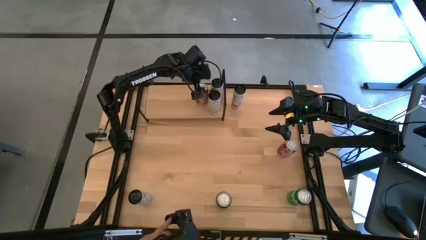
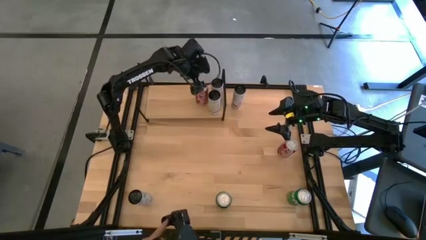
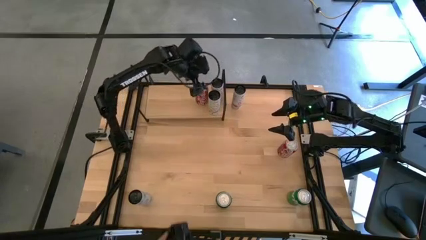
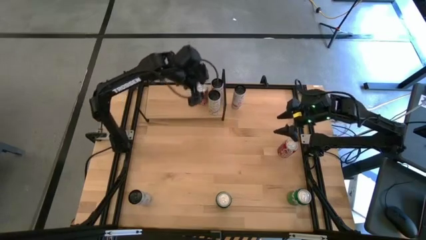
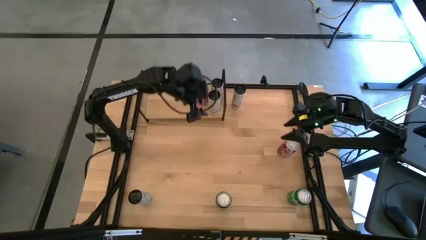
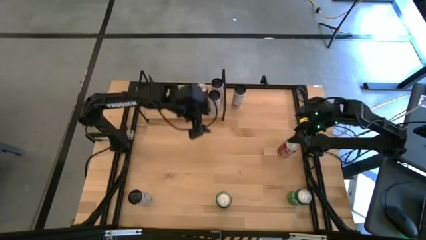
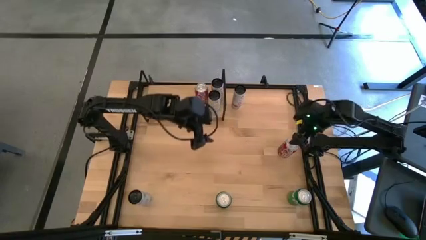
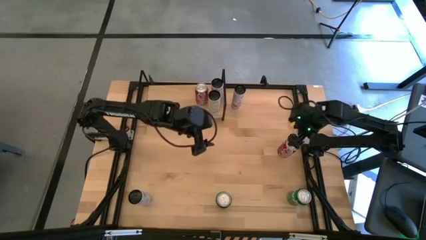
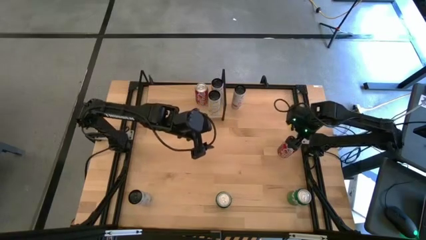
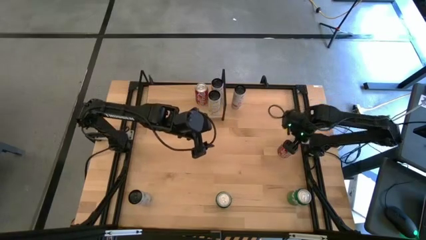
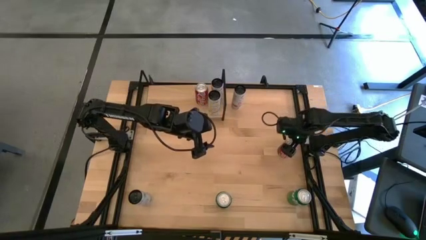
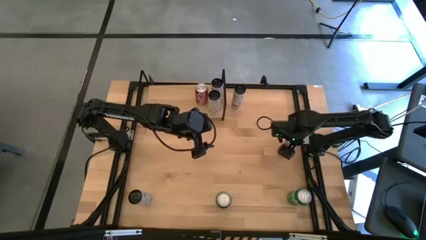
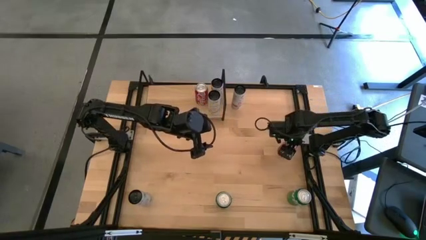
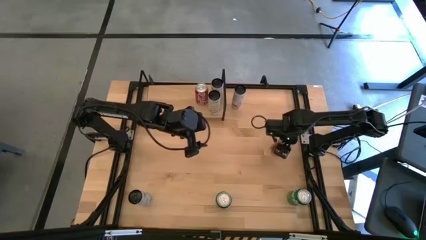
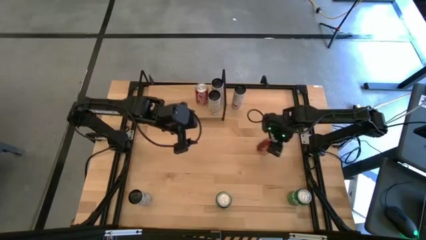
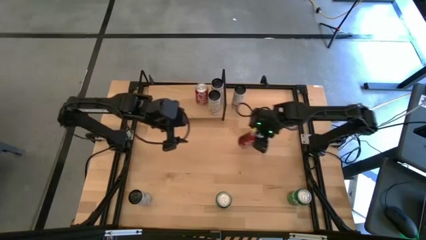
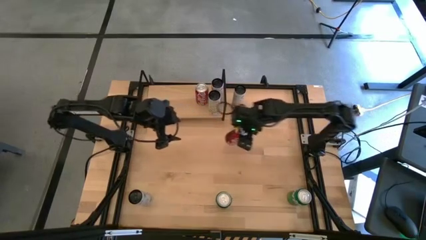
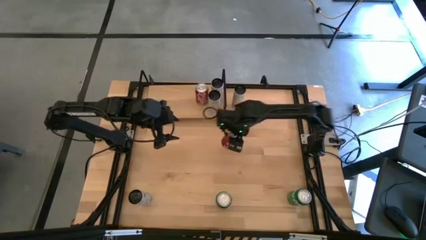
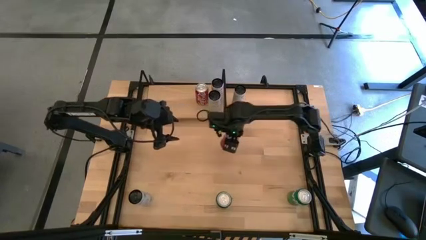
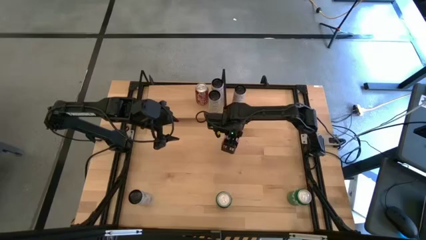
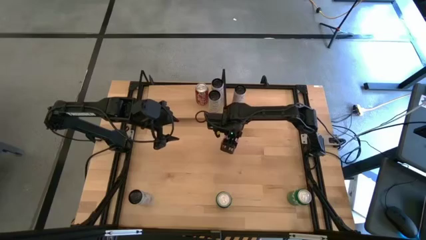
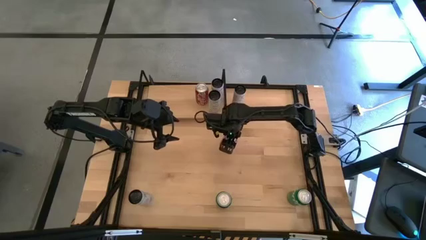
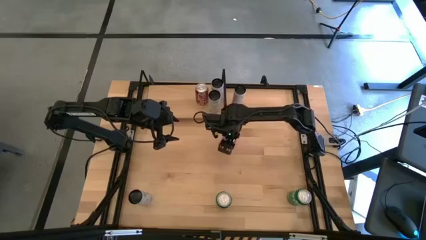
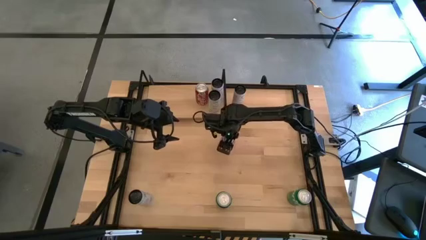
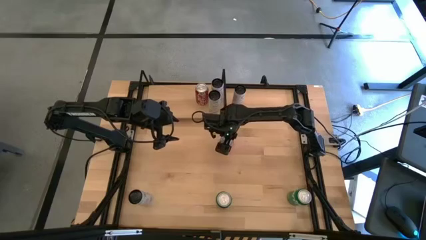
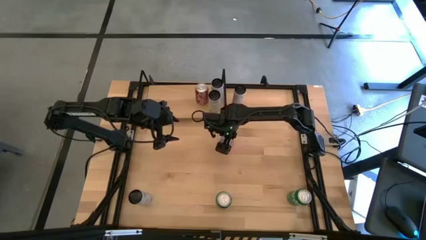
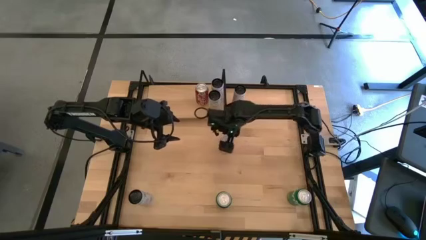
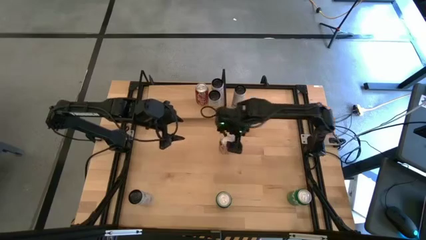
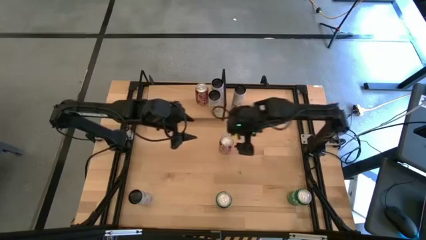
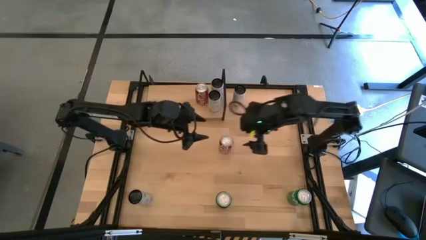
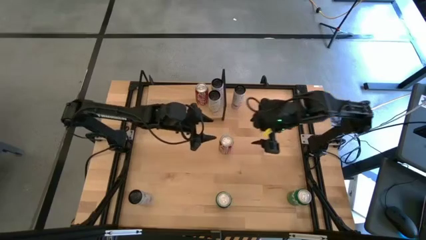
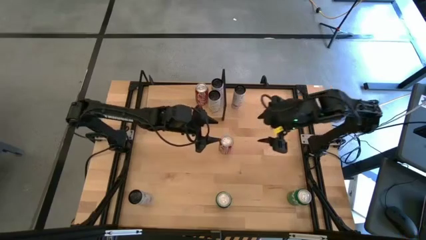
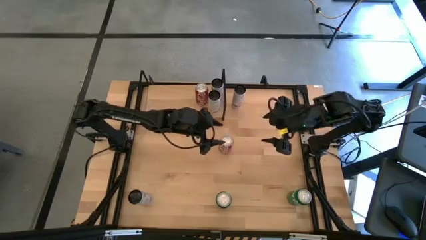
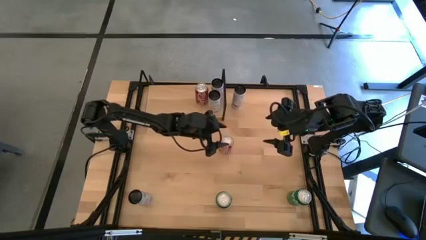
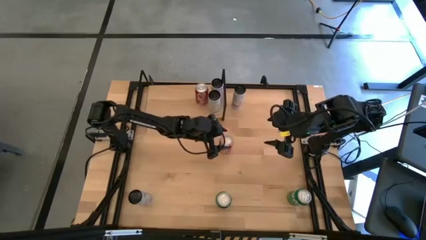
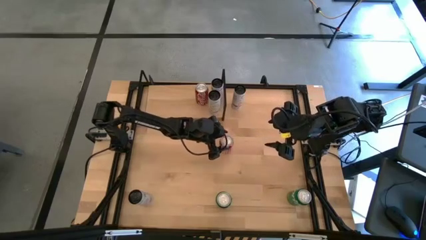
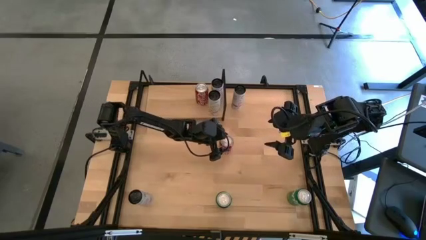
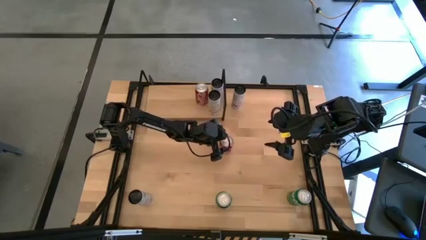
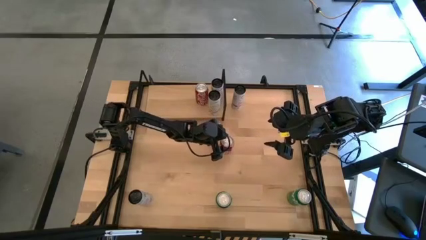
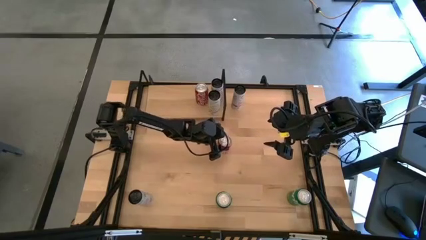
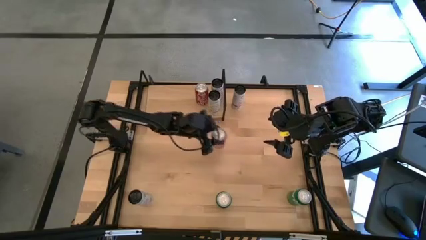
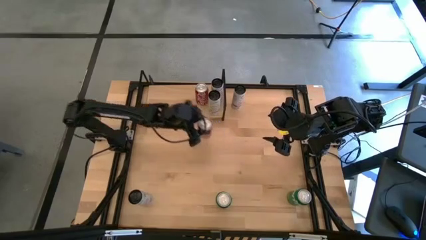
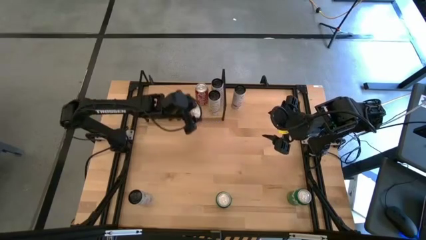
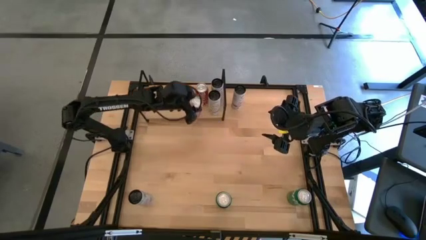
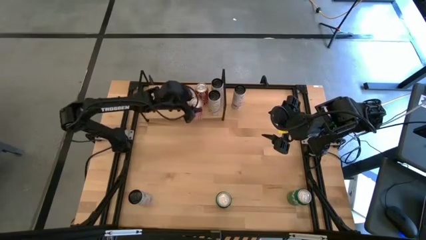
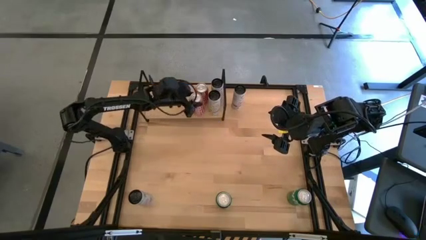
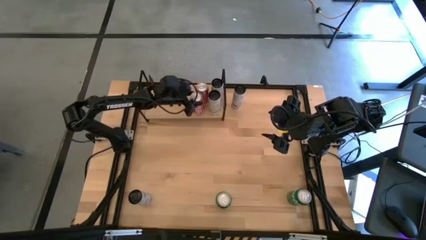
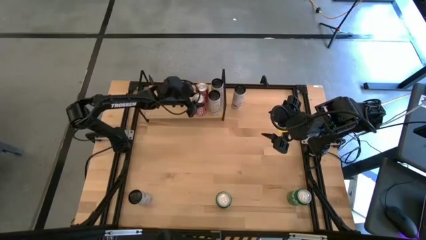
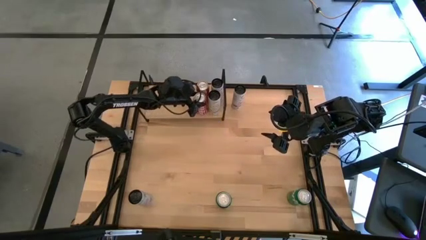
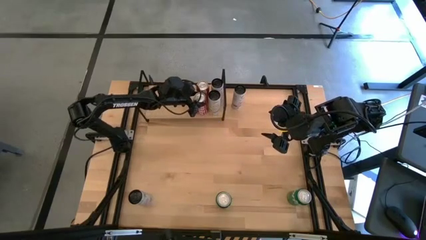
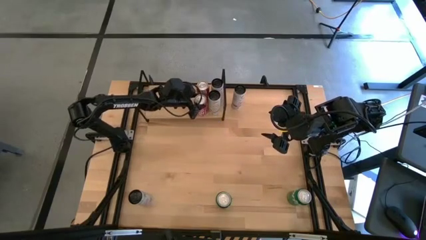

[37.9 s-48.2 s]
Task: Place canned beverage on shelf
Put the red white soda can on the shelf aligned with the other red white soda can

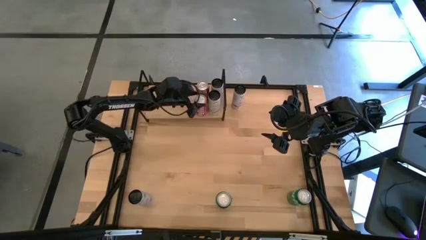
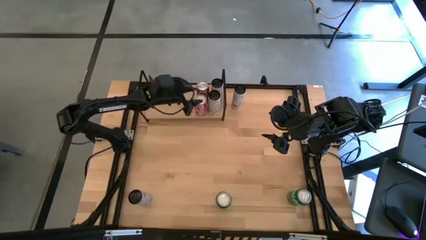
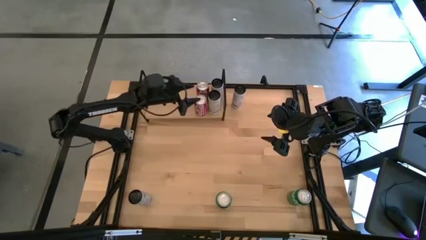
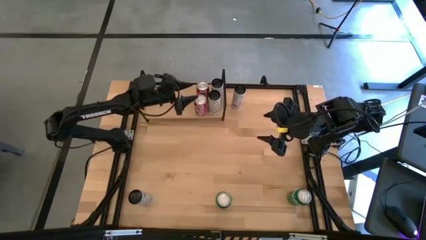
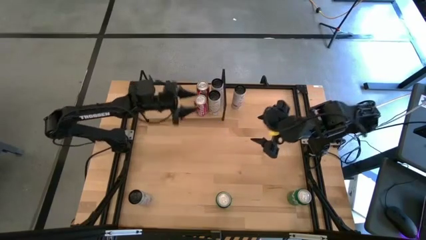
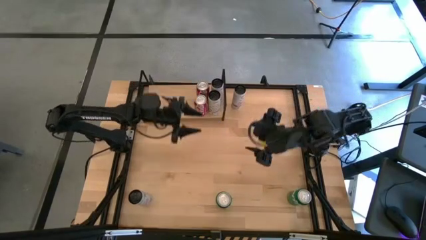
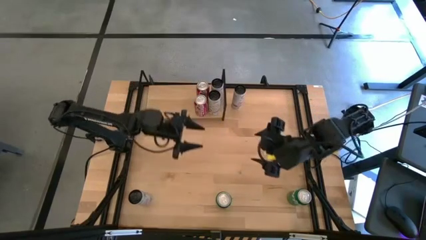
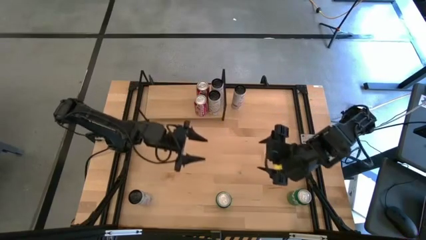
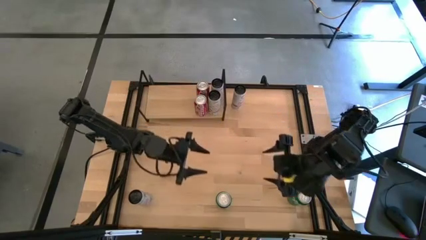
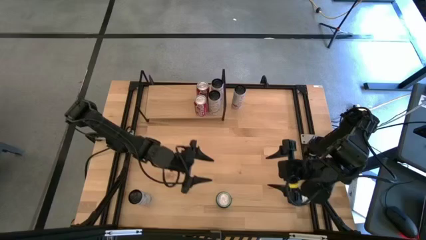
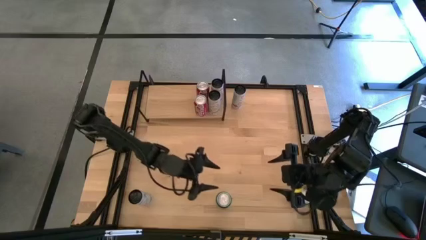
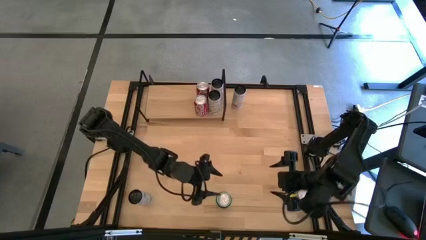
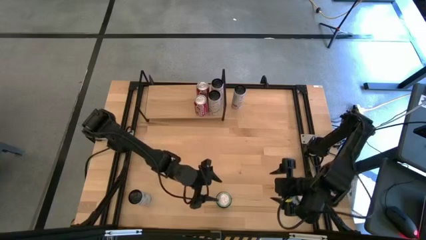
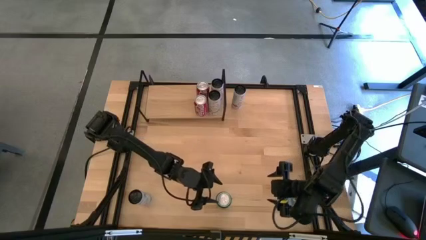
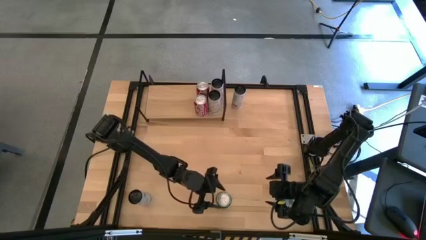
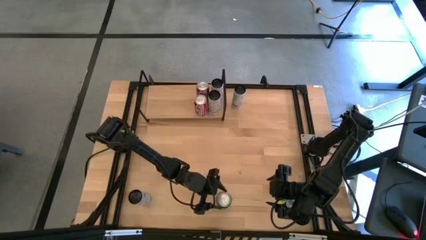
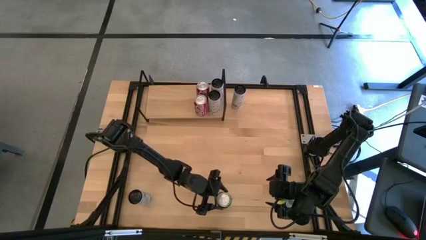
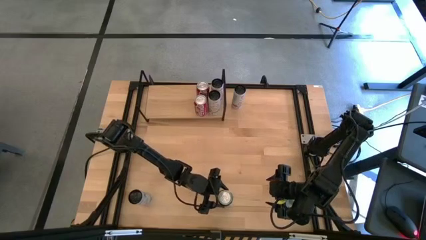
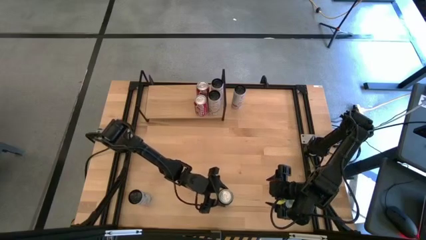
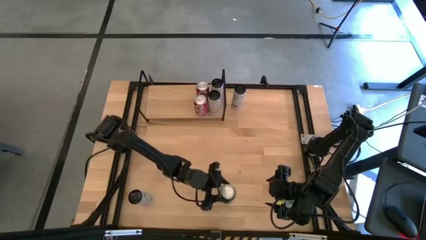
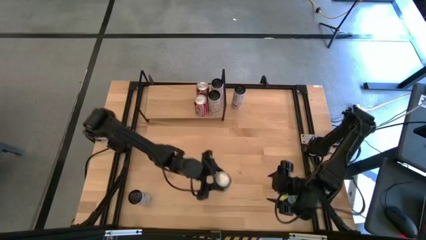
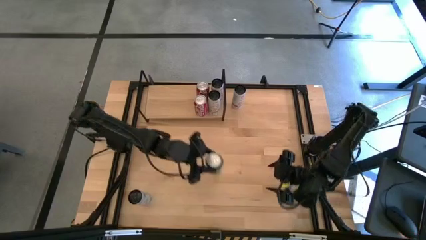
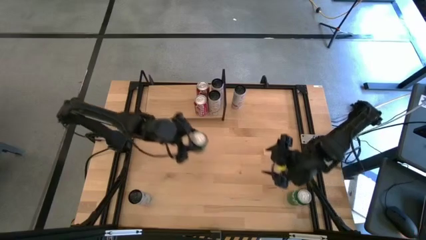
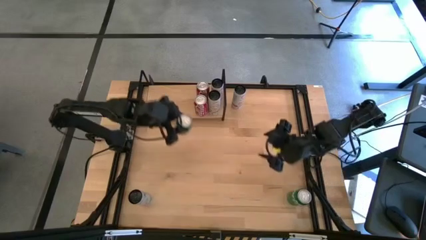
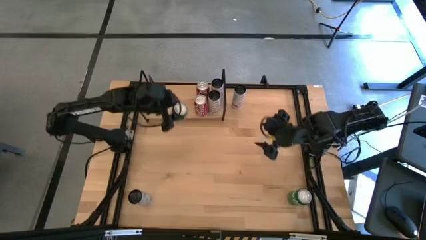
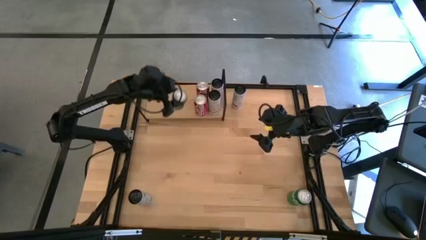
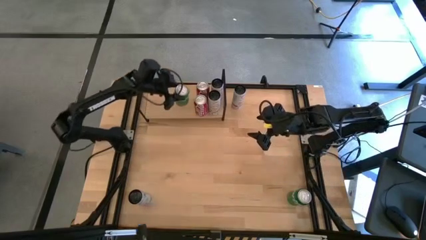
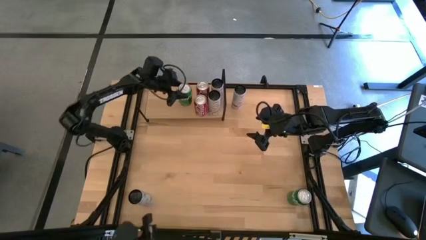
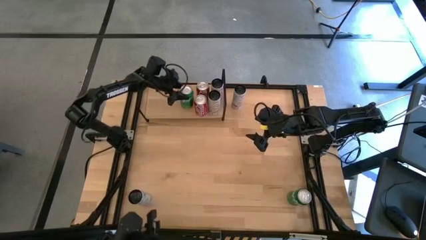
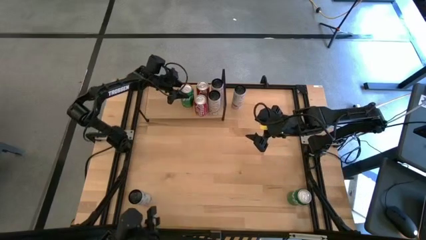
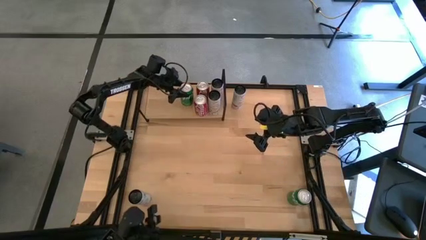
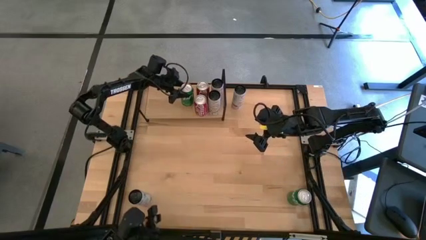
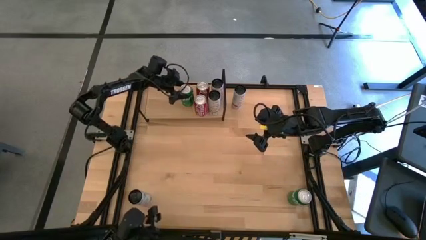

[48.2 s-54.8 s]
Put the left green soda can on the shelf
